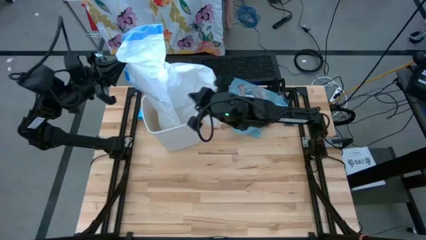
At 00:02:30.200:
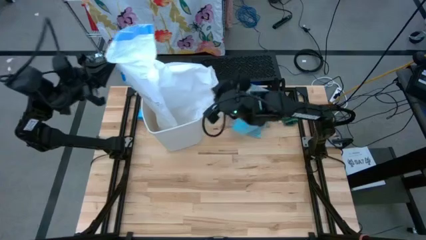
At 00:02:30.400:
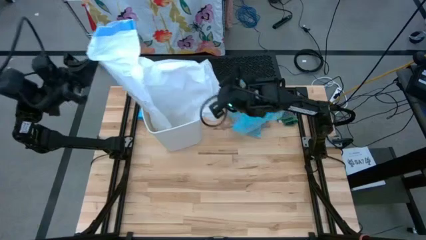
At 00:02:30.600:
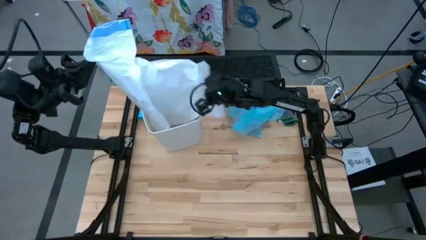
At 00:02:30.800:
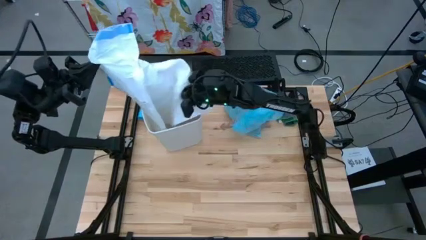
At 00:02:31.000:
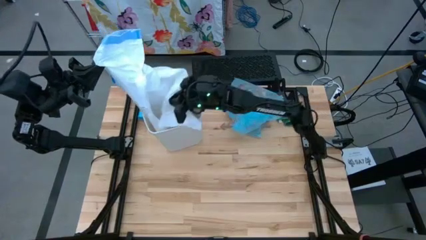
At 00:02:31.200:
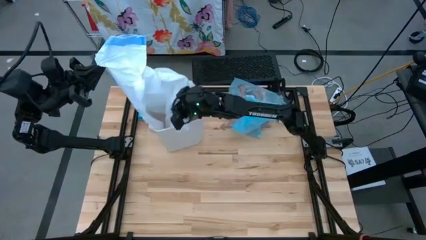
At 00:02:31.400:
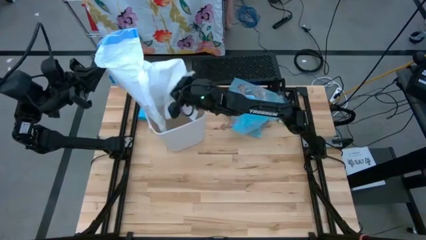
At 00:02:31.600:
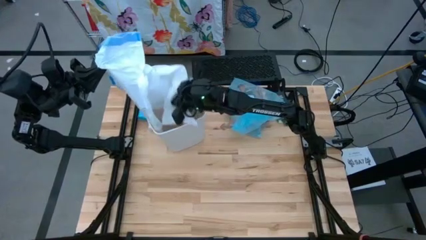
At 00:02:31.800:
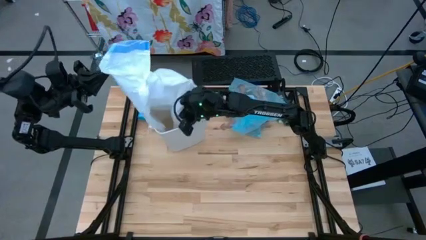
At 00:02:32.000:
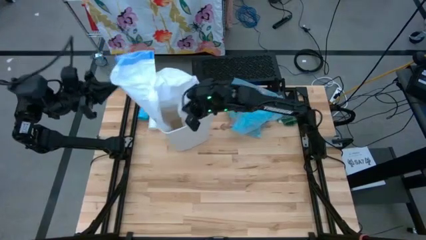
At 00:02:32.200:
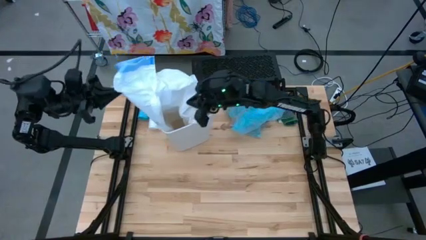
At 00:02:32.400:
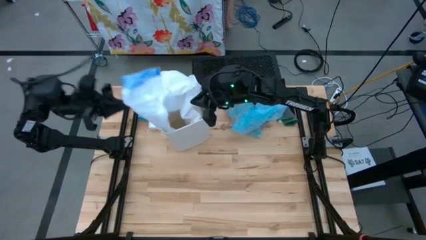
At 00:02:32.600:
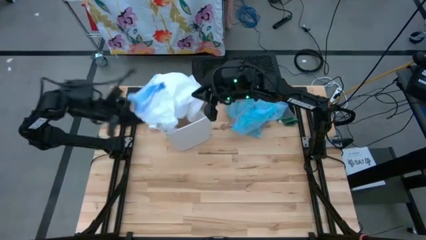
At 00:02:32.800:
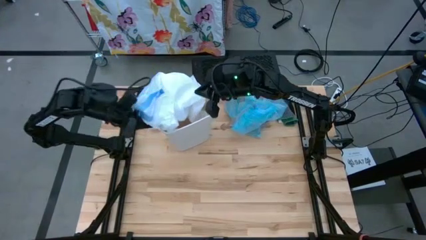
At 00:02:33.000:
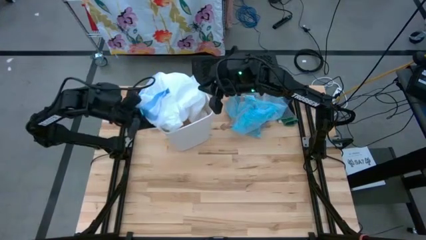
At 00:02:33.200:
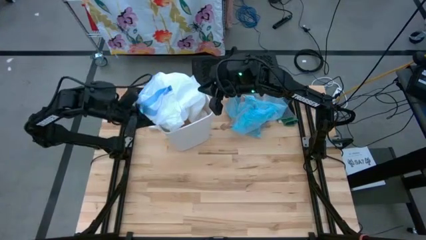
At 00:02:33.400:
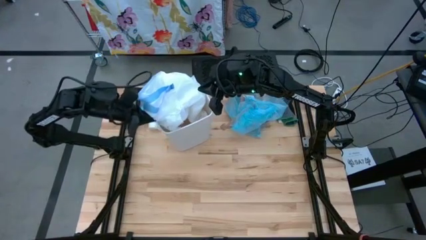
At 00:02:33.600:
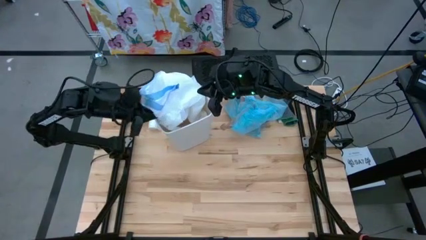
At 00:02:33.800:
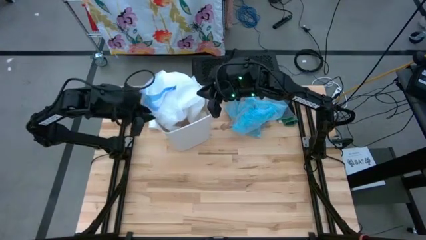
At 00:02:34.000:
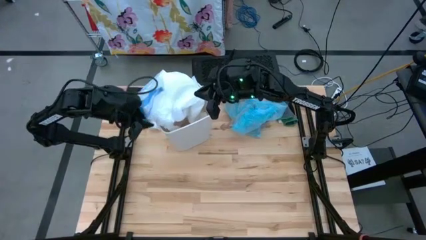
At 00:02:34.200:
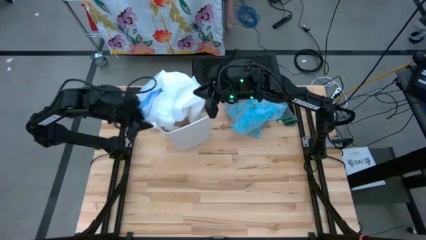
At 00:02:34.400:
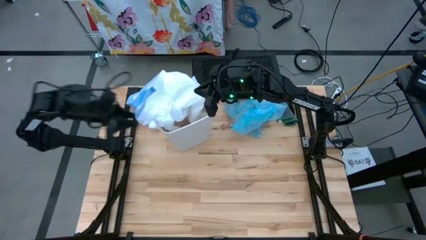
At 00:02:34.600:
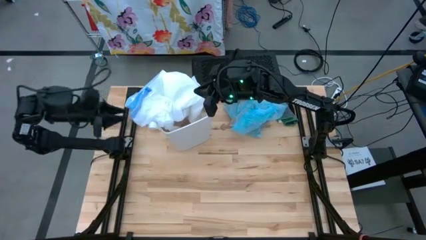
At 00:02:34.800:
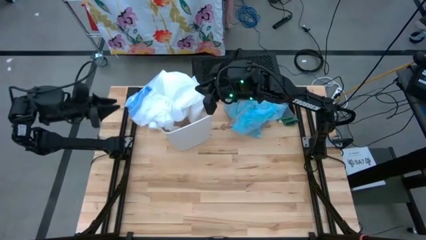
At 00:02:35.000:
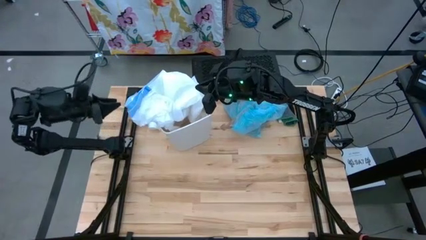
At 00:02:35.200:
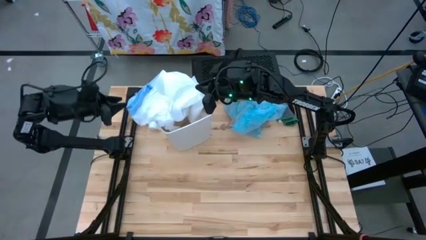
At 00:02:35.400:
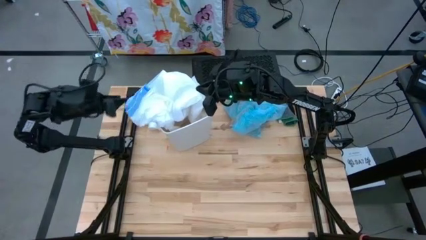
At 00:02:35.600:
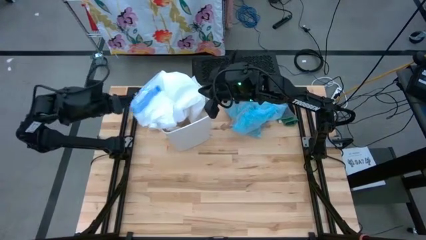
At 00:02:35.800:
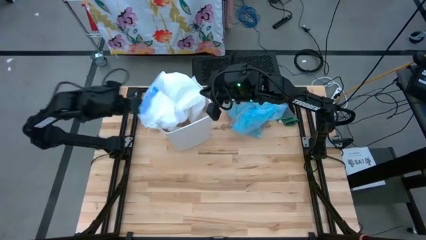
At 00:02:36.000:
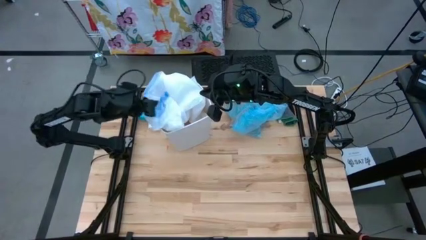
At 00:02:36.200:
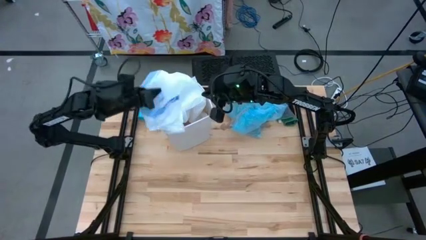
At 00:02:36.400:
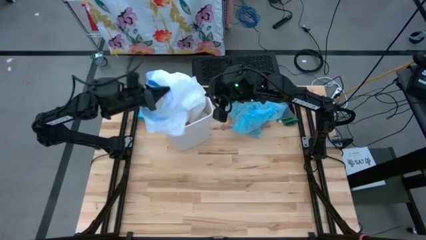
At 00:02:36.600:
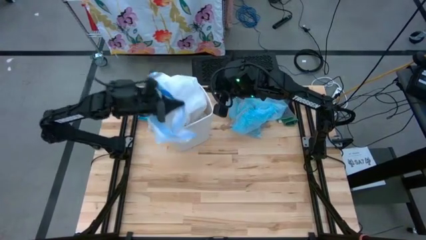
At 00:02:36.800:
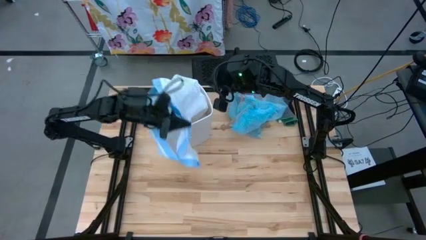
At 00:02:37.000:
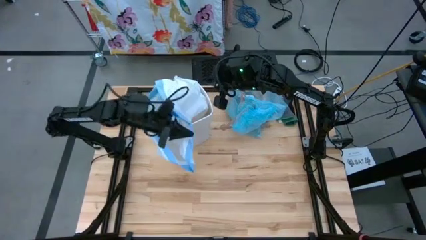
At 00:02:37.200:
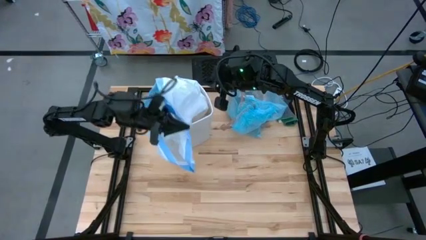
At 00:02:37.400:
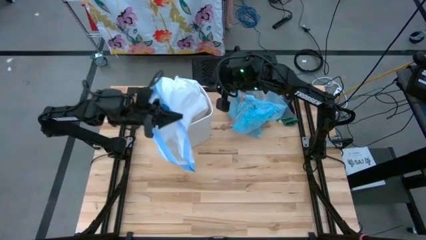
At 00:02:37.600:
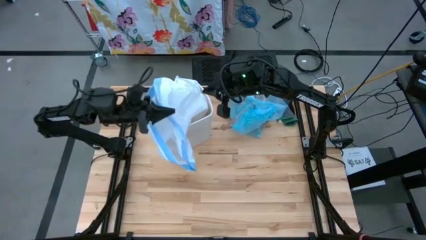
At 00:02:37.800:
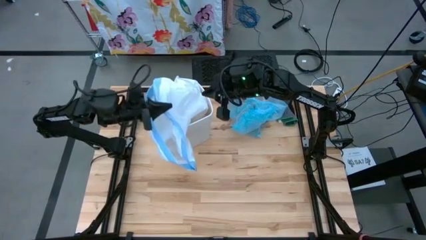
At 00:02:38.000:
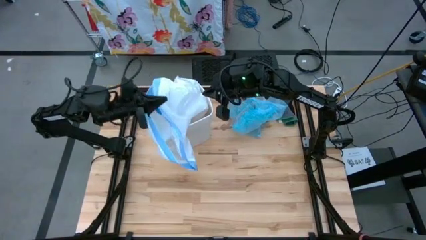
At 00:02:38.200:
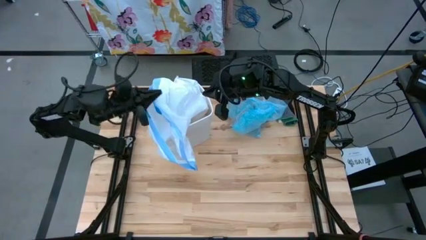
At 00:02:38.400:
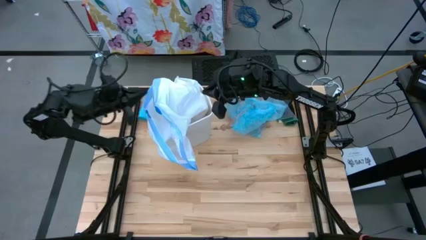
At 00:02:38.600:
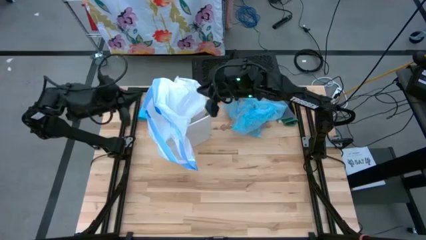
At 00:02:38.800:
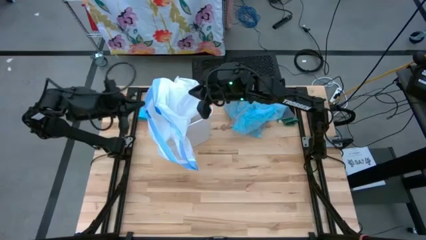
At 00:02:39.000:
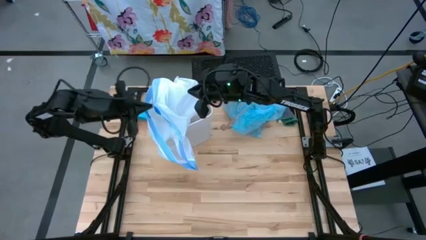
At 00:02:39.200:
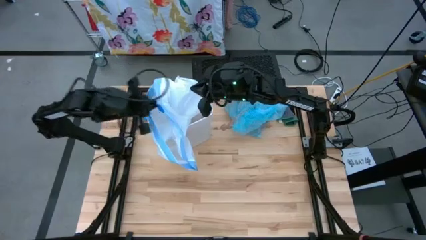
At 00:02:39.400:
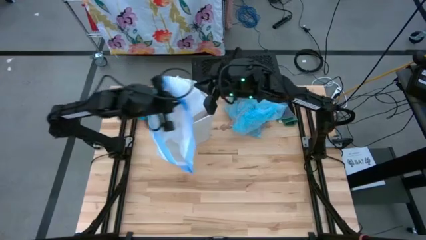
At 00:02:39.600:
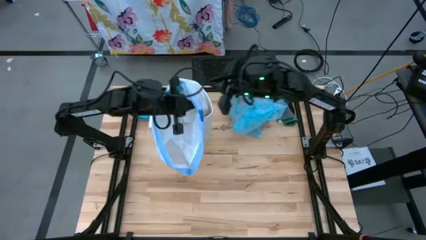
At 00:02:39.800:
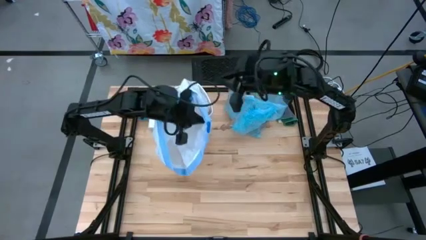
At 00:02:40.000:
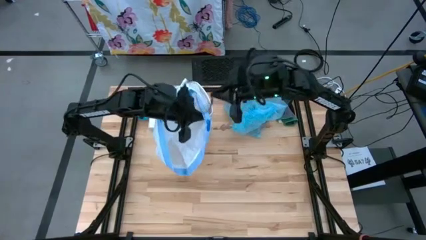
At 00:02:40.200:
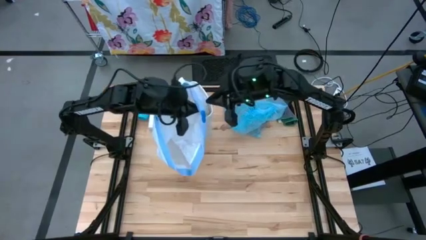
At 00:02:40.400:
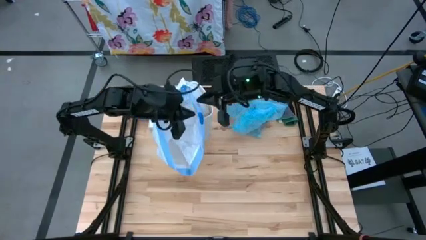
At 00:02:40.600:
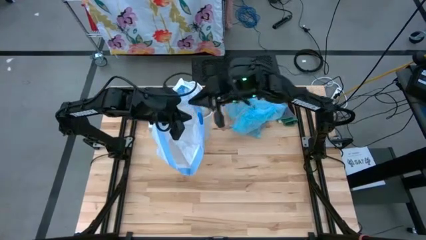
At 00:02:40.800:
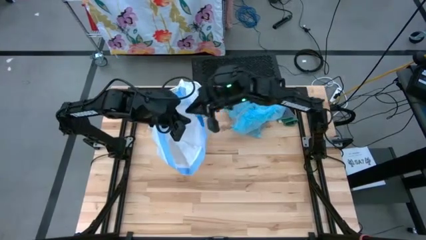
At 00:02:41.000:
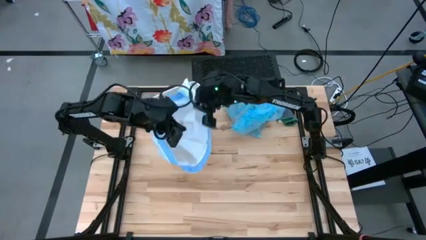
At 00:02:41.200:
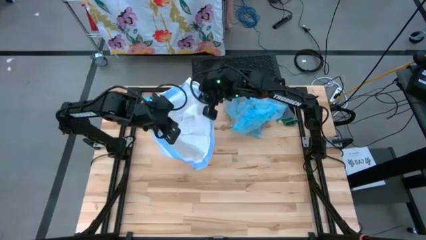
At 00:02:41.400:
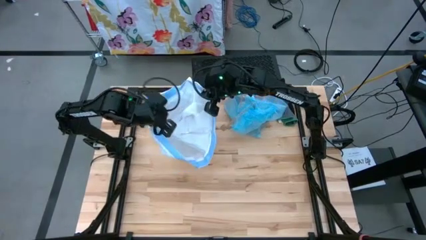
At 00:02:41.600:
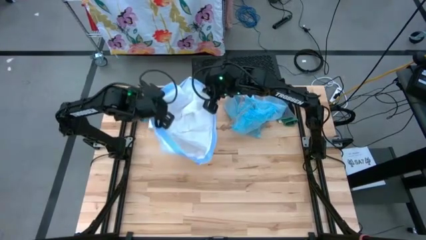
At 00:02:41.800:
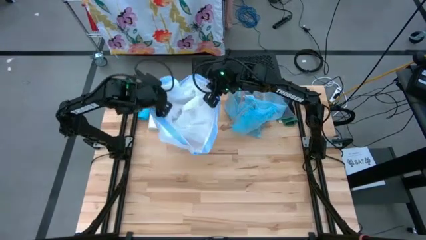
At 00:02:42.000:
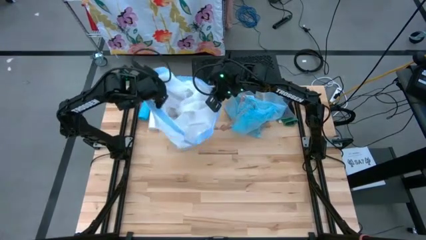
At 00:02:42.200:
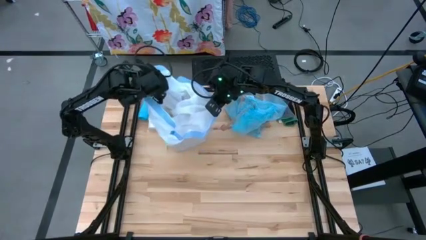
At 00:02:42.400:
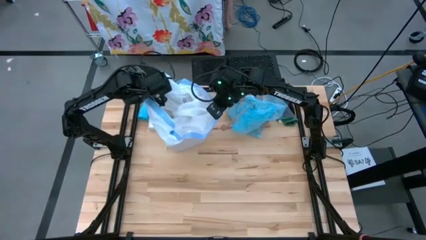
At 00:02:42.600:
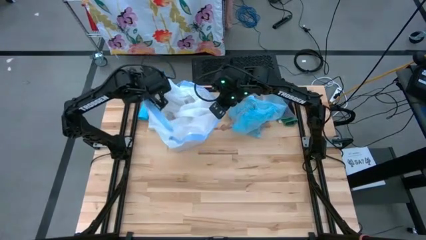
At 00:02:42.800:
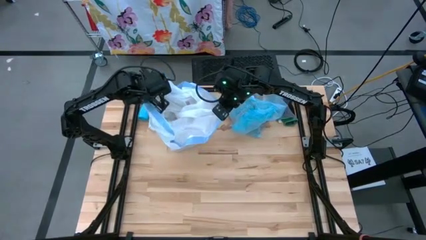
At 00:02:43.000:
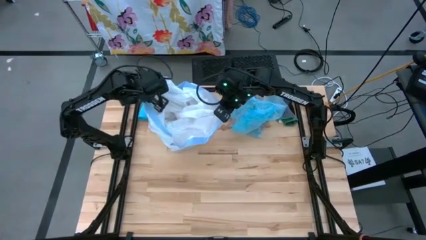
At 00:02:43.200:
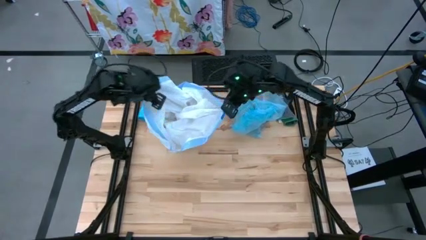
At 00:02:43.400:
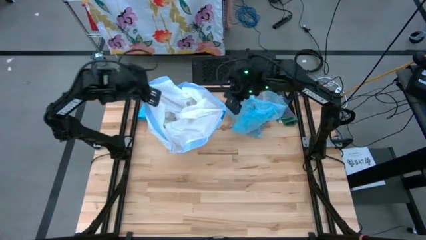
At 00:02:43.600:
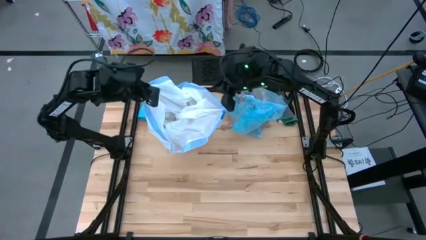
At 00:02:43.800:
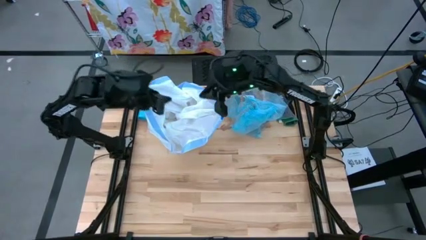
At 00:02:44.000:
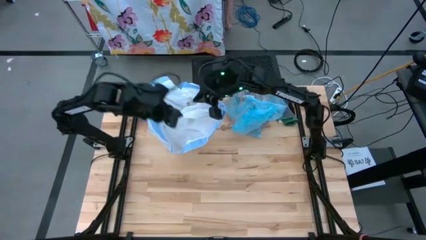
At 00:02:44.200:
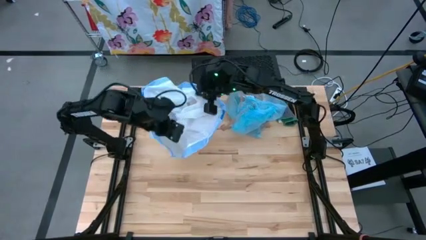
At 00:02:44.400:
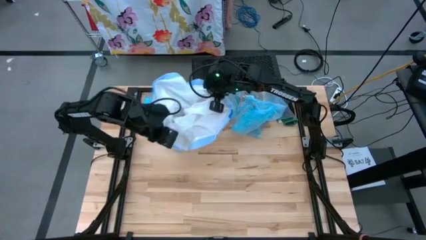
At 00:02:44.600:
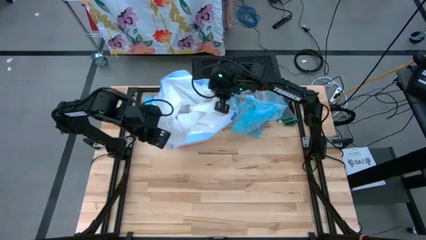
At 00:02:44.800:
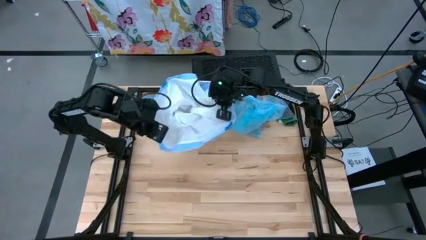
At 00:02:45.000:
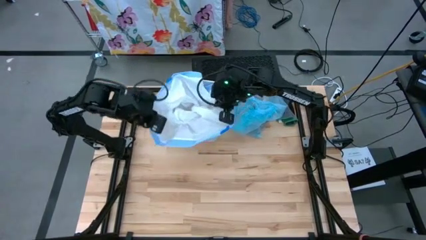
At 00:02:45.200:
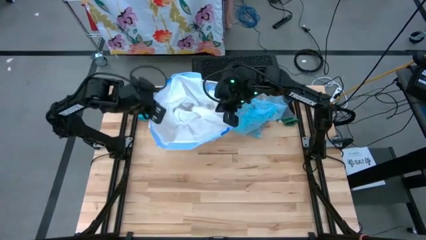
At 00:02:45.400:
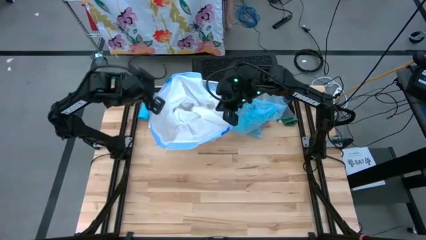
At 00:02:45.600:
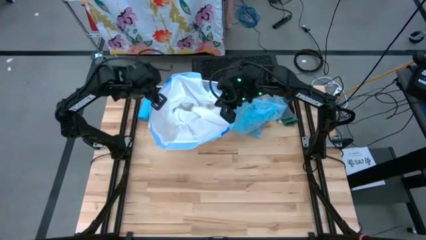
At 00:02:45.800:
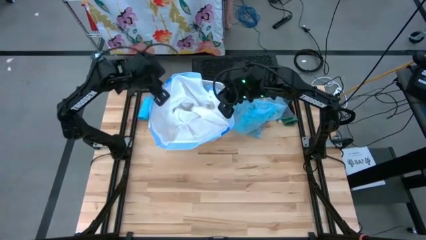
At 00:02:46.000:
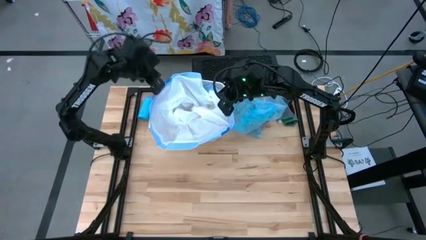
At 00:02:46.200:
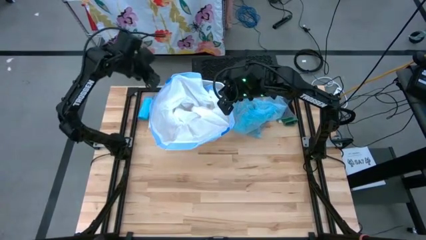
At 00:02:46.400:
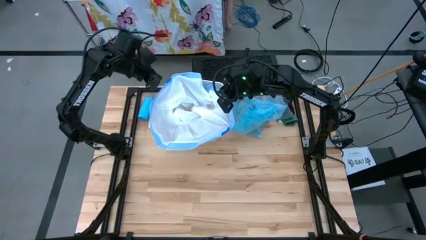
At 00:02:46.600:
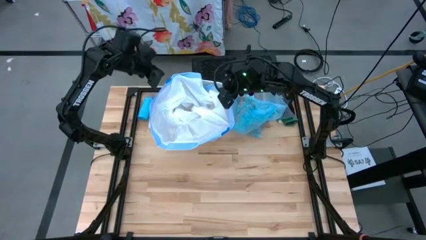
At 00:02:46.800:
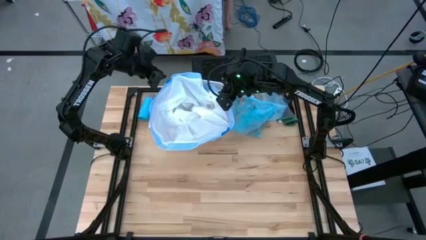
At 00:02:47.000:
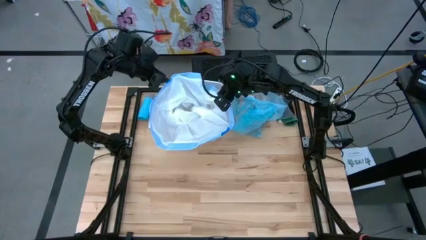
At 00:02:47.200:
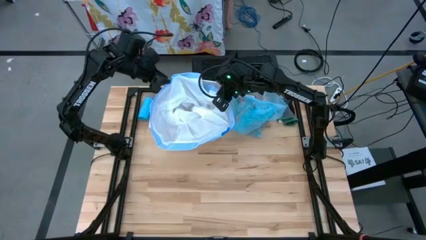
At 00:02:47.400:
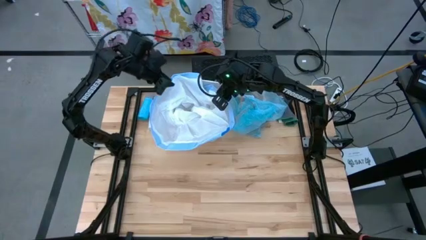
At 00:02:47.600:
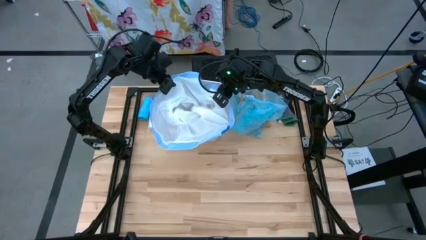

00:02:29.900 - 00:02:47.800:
Task: place trash/remove bag and relplace
Put the white trash bag into the white trash bin
